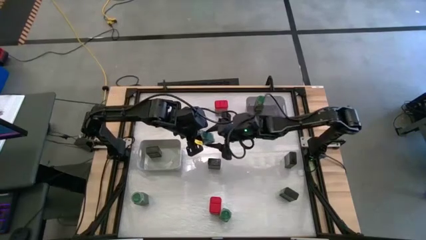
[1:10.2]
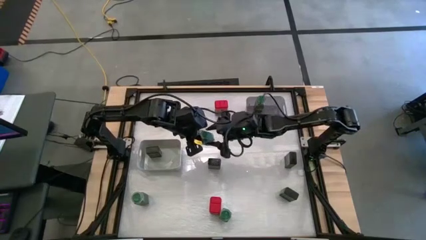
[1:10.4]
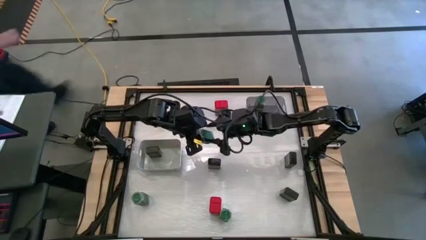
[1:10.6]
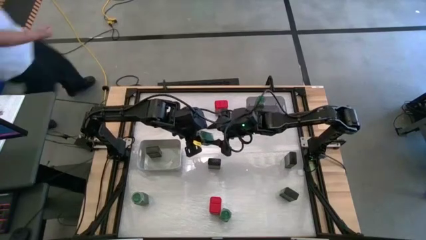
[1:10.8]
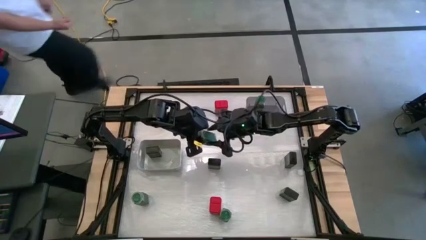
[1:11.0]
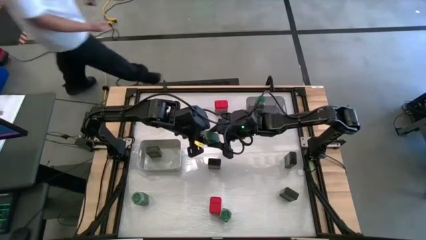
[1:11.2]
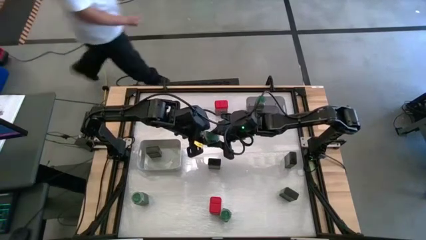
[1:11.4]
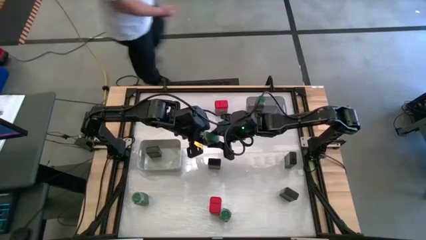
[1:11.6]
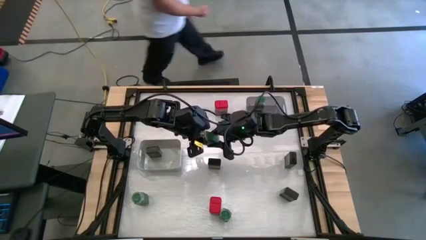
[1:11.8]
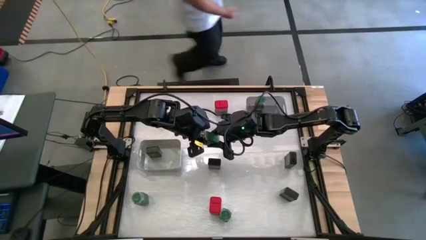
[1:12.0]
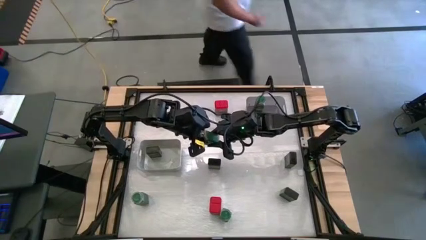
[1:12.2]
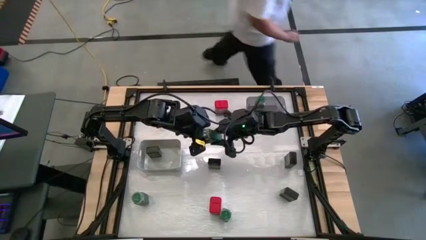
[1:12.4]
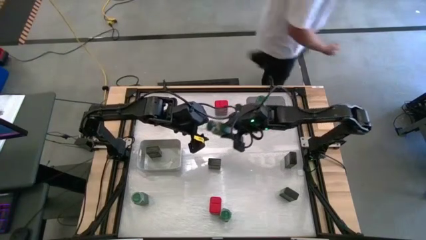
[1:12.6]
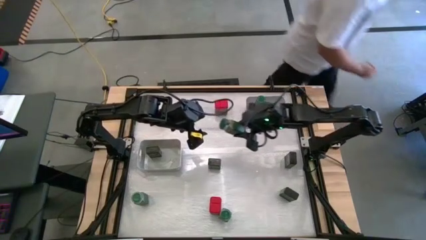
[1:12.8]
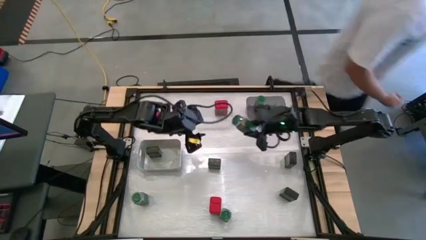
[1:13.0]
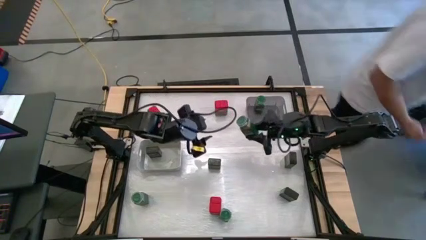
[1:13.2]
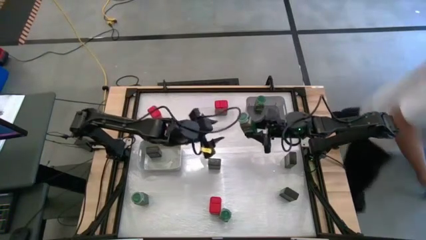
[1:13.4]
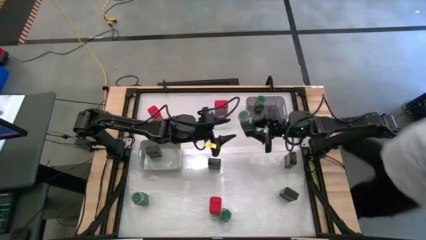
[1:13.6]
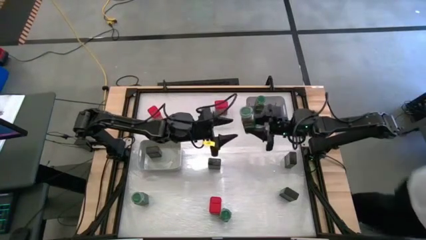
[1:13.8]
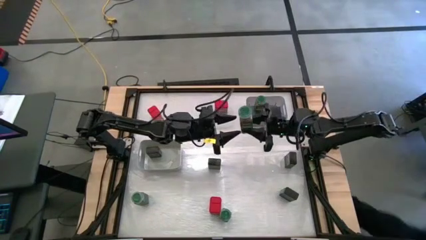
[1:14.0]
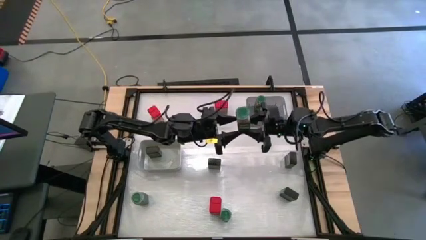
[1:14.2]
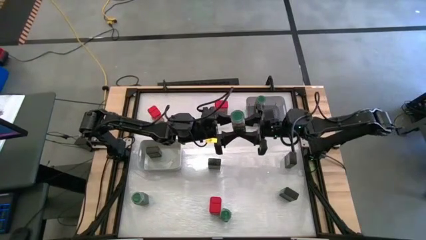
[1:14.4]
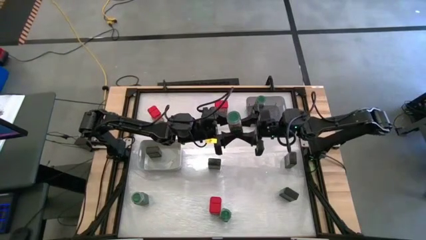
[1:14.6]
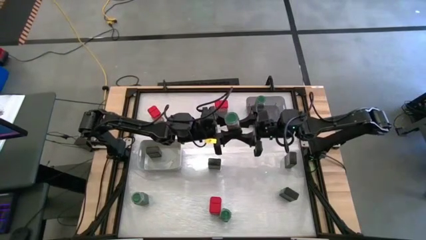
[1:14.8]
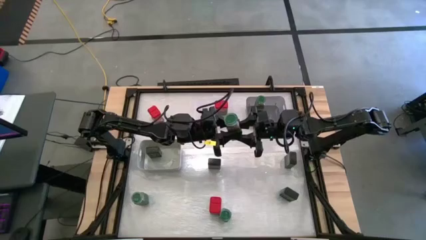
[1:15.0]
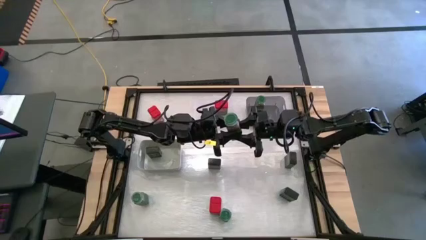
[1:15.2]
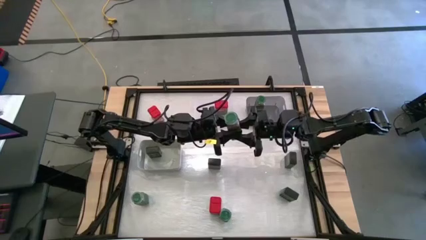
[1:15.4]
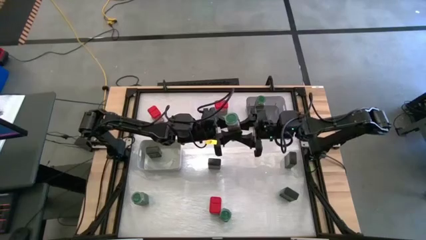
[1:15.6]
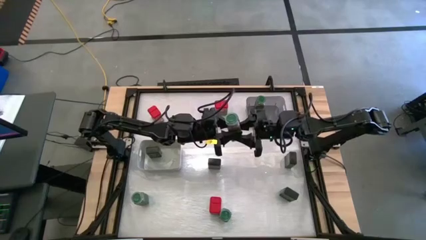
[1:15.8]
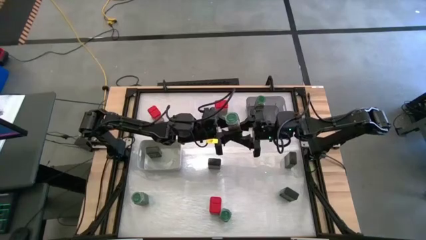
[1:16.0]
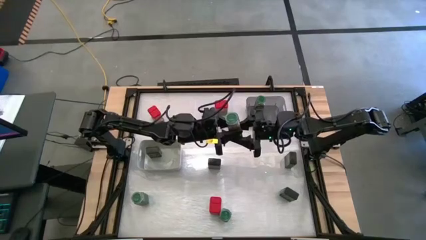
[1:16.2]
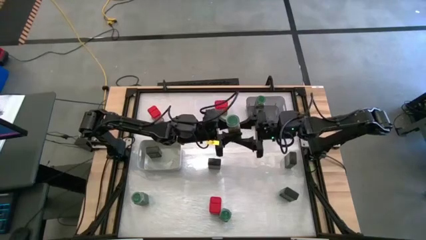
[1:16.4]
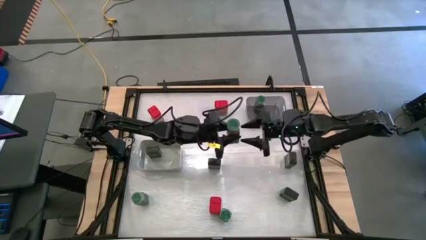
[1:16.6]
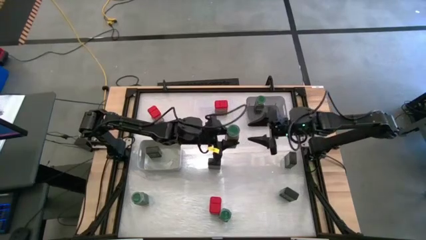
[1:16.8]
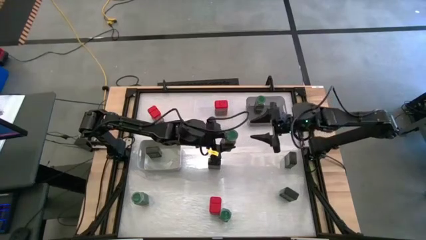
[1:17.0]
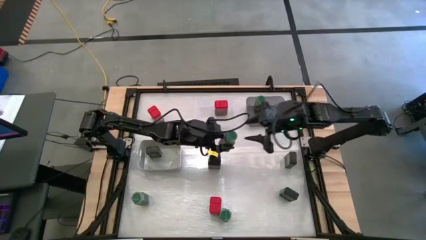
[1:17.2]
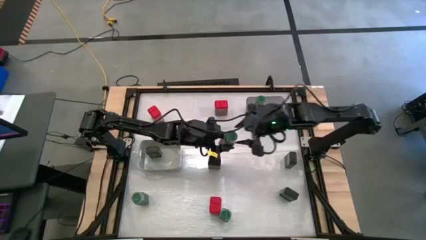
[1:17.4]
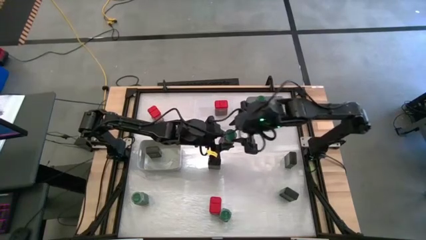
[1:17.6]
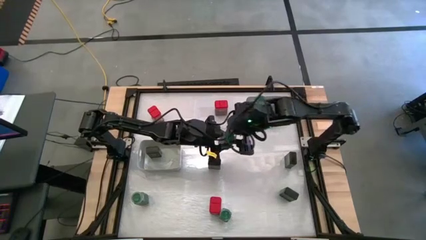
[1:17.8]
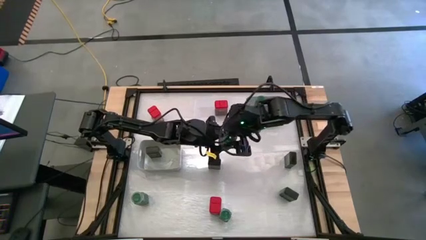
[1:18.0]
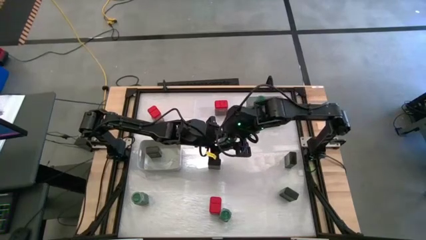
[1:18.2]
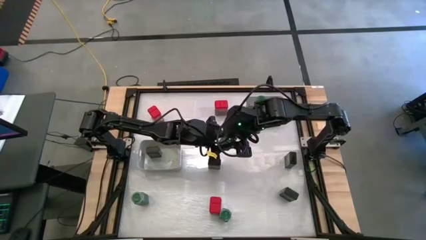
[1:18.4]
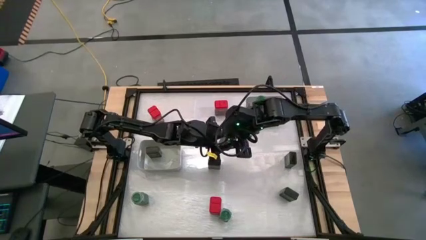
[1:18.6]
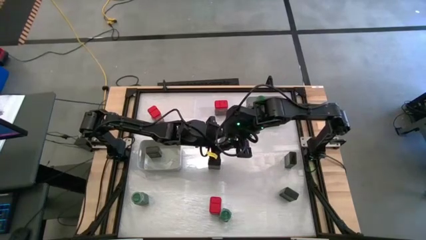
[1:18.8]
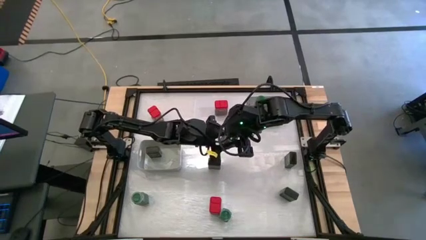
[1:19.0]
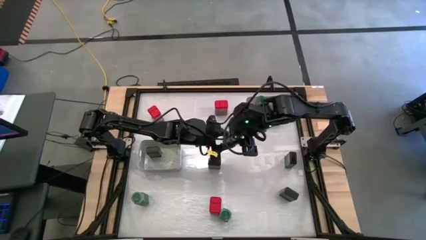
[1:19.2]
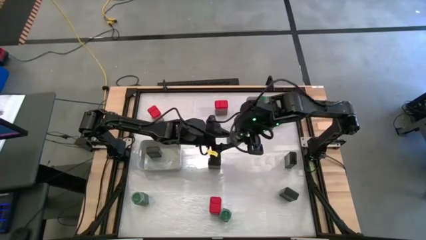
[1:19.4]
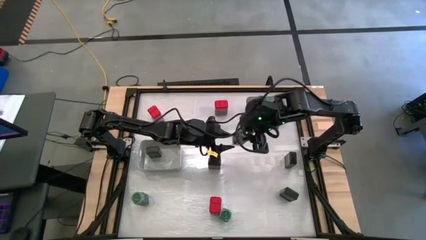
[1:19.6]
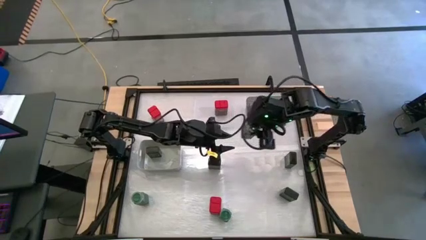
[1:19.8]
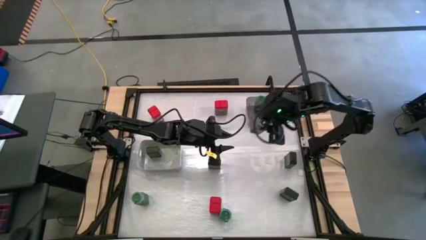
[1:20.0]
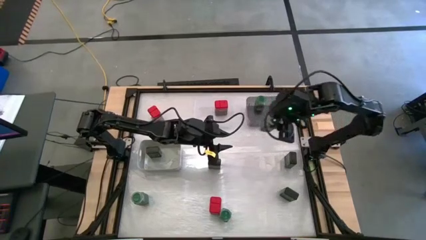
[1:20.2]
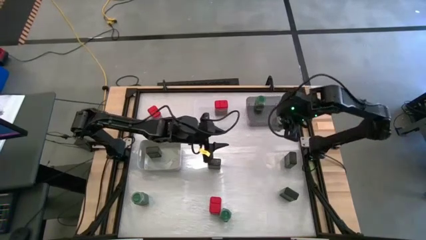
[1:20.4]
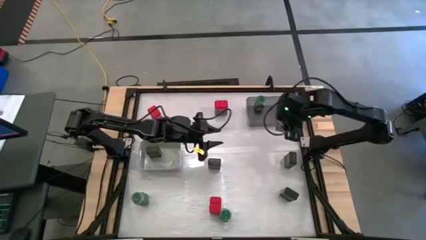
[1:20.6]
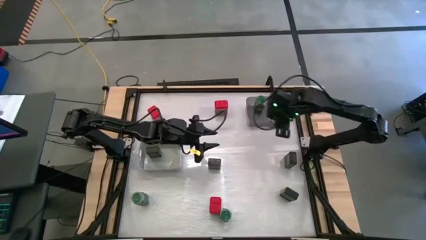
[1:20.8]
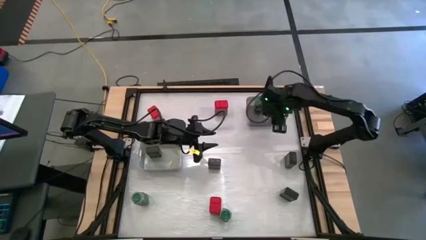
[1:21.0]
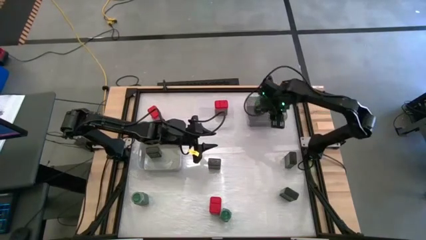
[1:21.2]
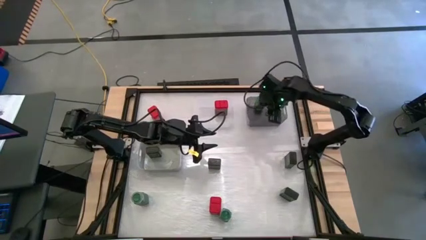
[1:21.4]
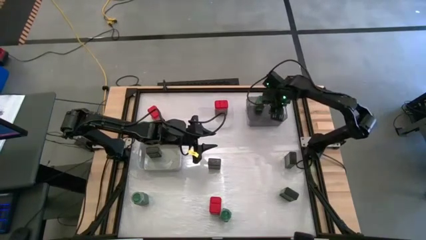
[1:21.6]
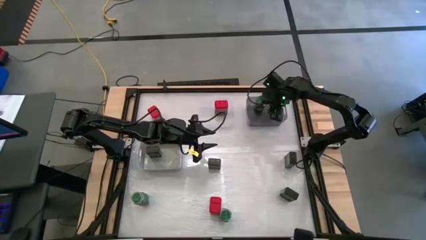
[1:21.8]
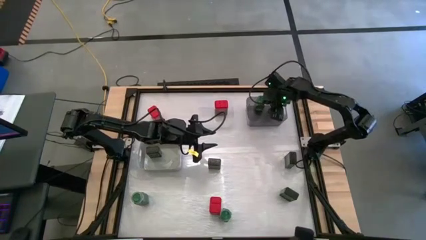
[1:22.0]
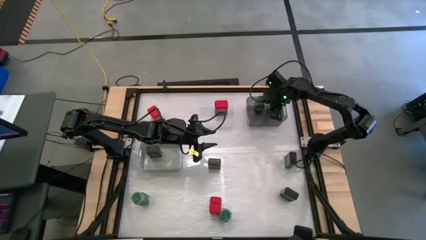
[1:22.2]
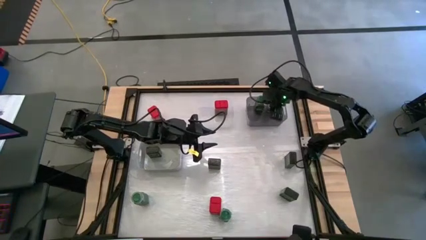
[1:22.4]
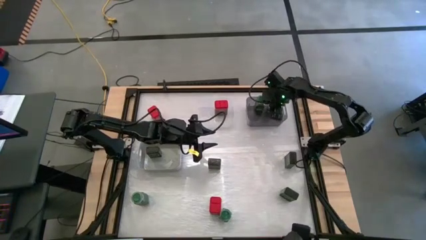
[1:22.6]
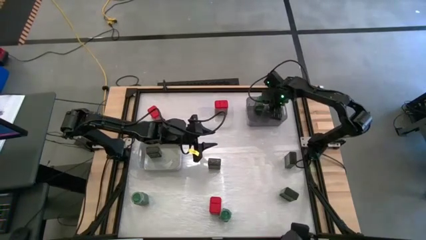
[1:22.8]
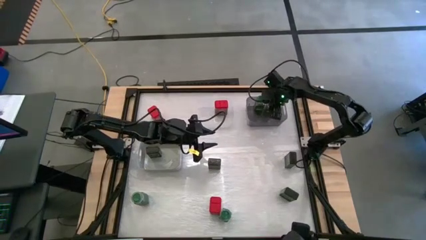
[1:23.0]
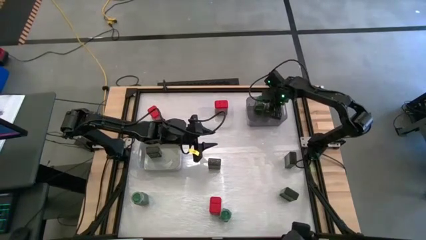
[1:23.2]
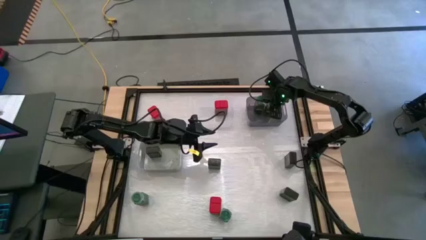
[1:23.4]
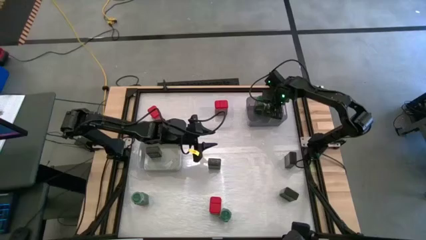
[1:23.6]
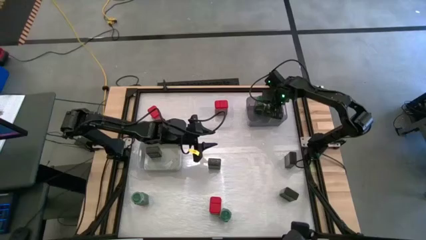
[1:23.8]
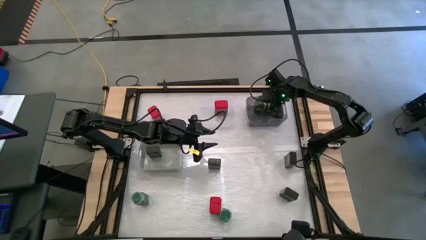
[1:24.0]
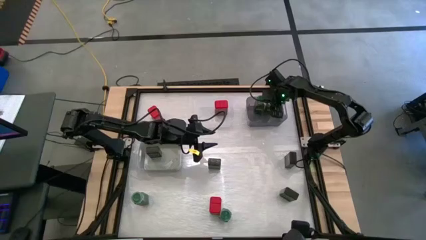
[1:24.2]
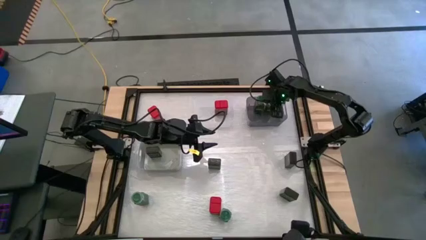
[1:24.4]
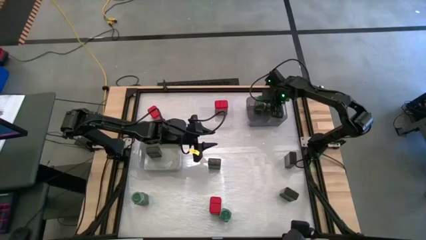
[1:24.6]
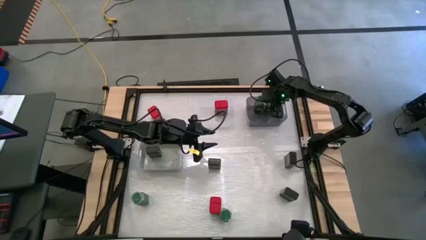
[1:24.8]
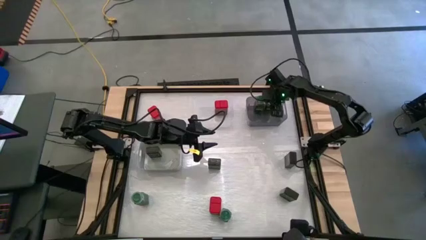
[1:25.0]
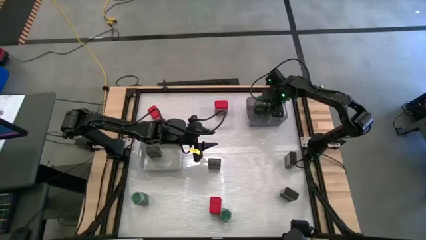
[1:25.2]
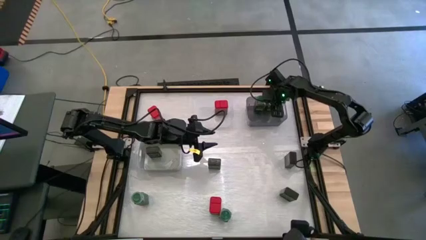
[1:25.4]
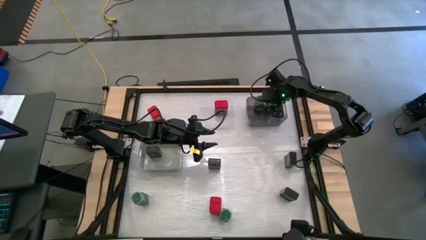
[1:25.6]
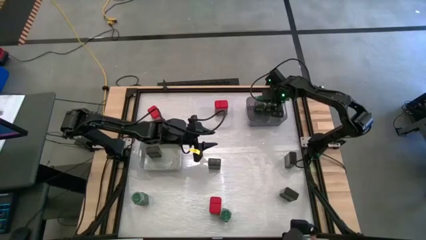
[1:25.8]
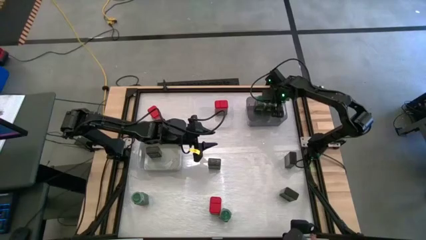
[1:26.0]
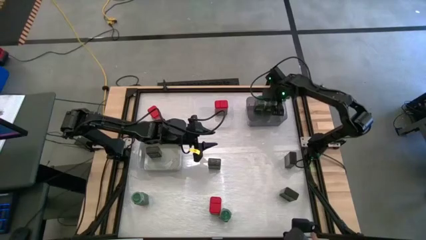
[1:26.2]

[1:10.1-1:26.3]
Task: Sort spices by type
Put the green seasoning bottle into the black bin

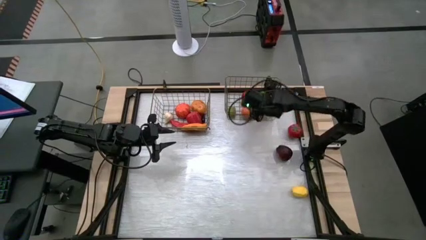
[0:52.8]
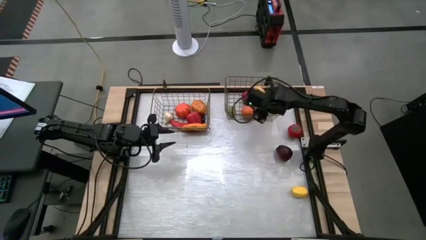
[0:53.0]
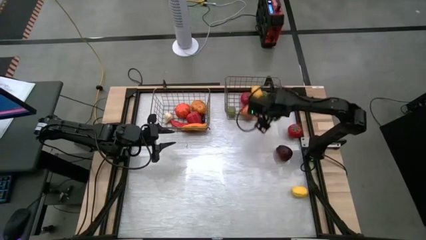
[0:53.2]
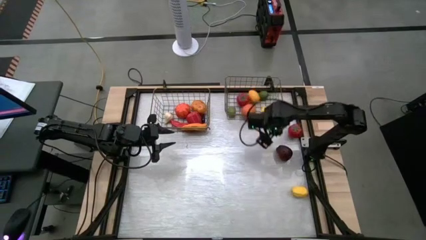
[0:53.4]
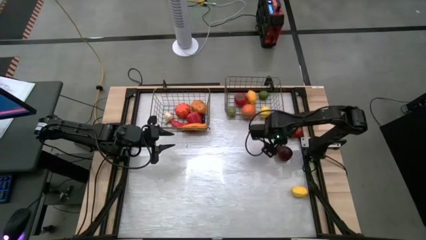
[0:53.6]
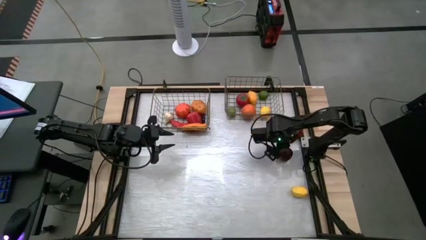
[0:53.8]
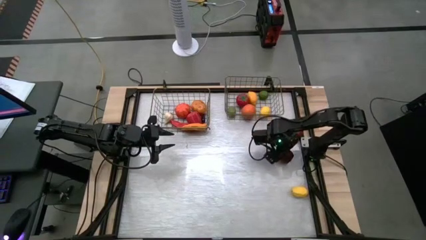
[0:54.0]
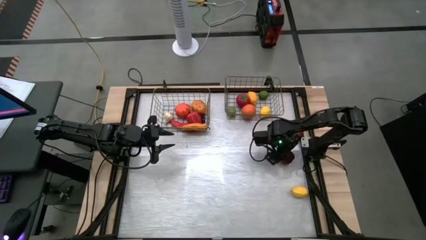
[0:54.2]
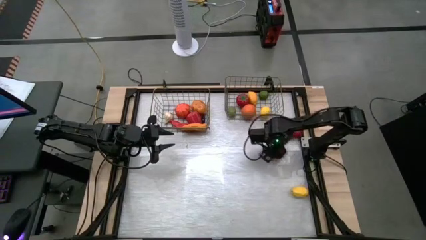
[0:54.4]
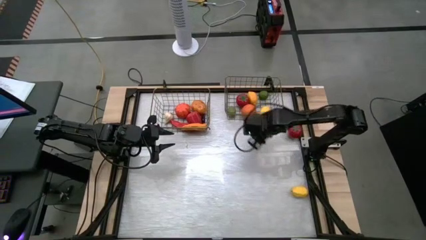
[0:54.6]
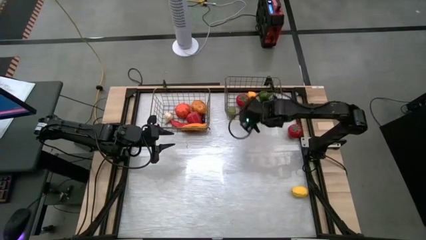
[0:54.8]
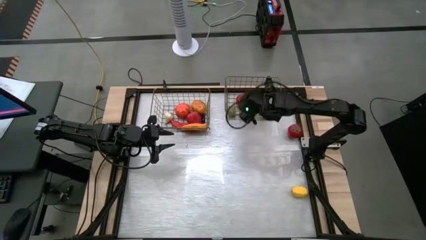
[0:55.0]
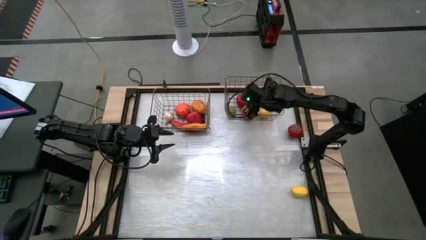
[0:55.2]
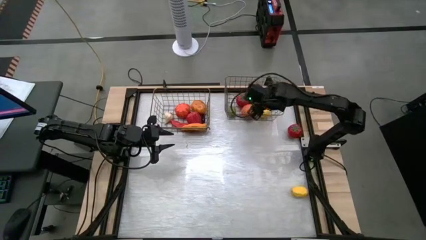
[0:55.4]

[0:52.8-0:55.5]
Task: Sort produce into baskets
Put the apple into the right gold wire basket
